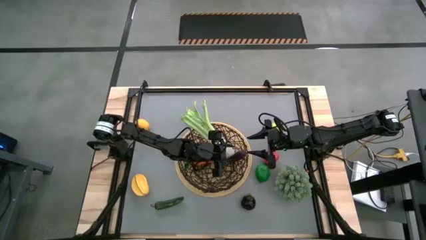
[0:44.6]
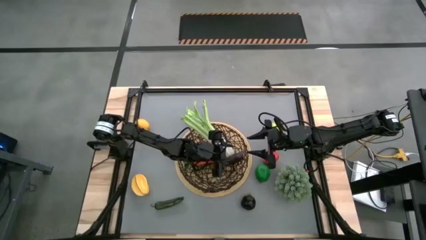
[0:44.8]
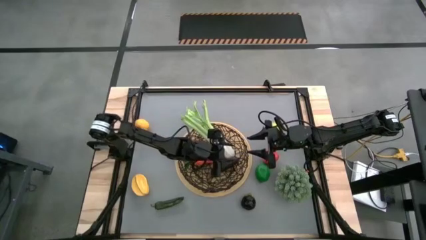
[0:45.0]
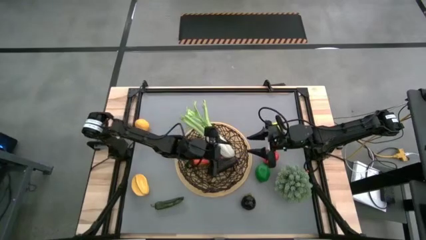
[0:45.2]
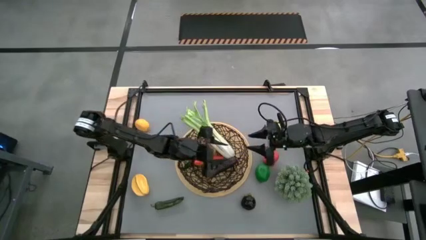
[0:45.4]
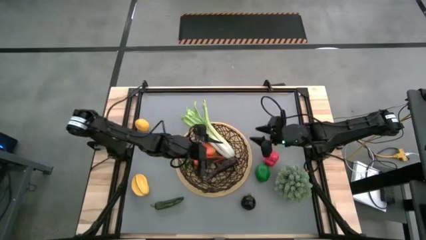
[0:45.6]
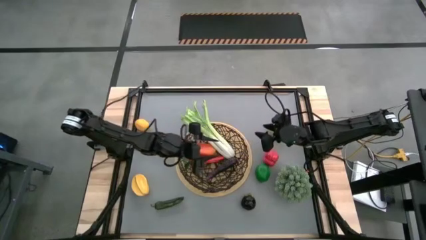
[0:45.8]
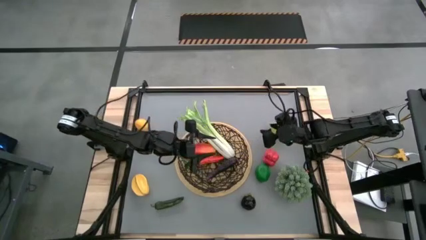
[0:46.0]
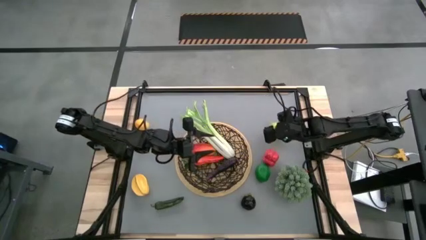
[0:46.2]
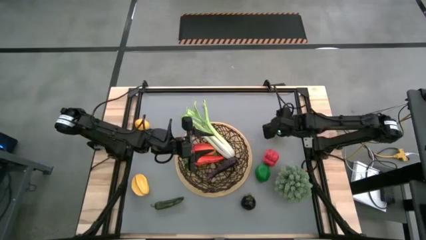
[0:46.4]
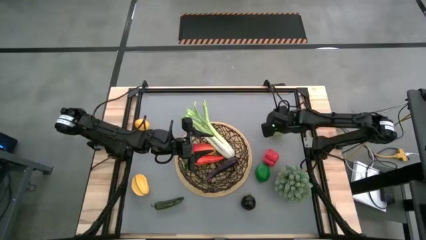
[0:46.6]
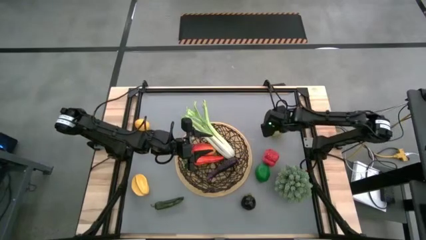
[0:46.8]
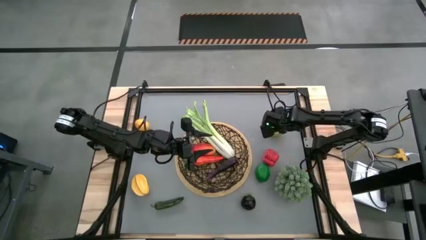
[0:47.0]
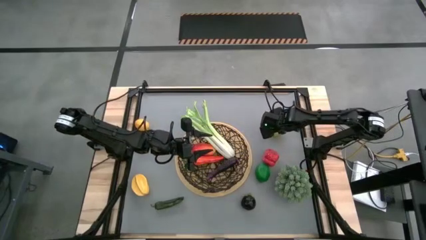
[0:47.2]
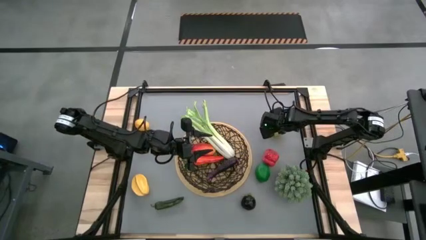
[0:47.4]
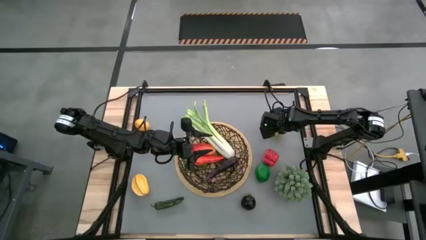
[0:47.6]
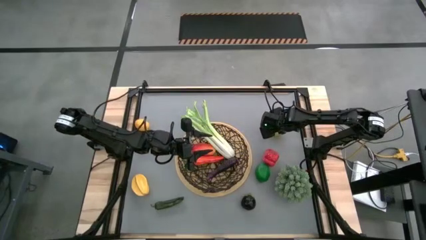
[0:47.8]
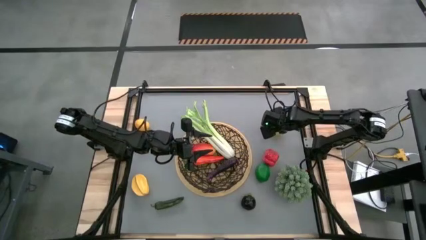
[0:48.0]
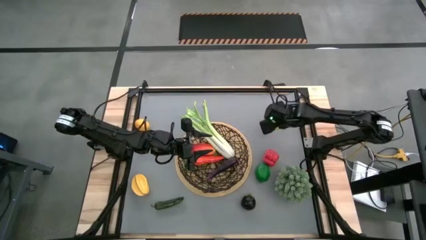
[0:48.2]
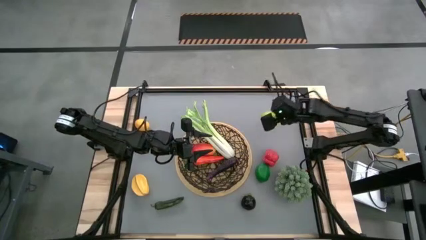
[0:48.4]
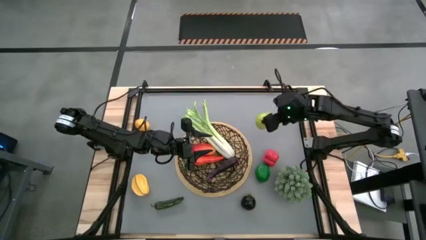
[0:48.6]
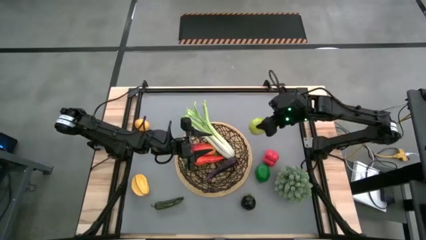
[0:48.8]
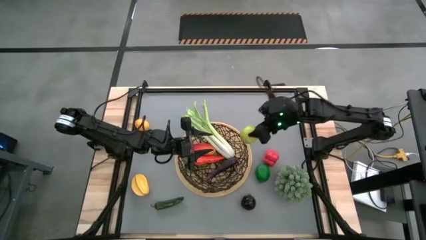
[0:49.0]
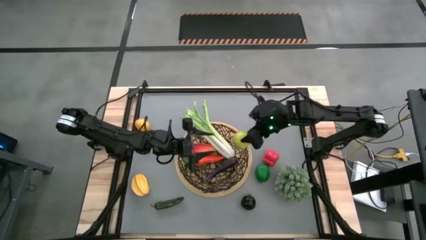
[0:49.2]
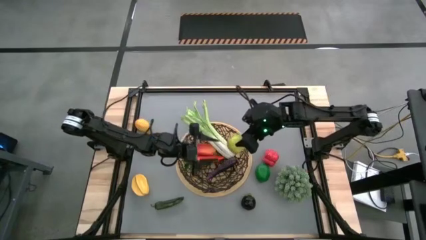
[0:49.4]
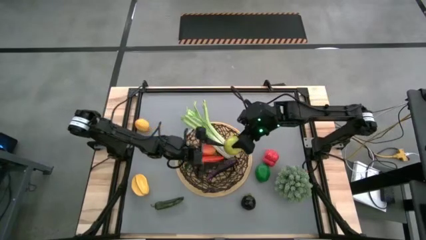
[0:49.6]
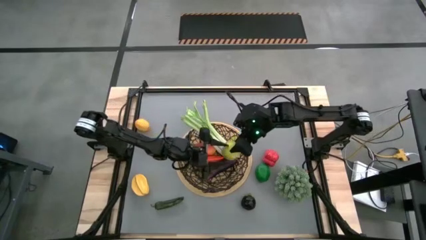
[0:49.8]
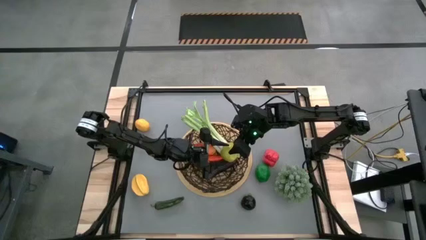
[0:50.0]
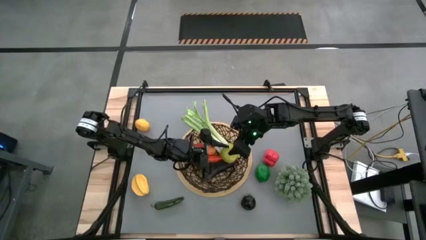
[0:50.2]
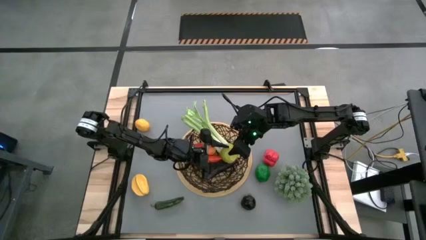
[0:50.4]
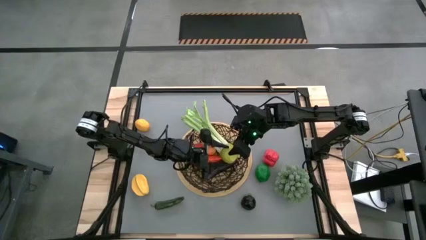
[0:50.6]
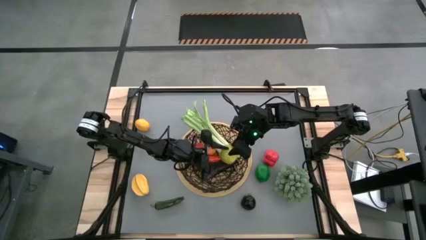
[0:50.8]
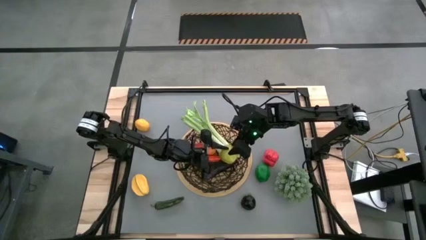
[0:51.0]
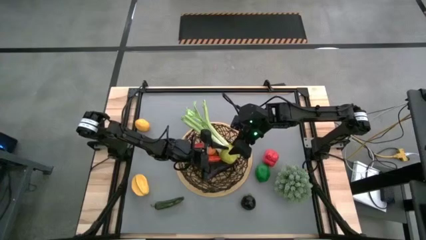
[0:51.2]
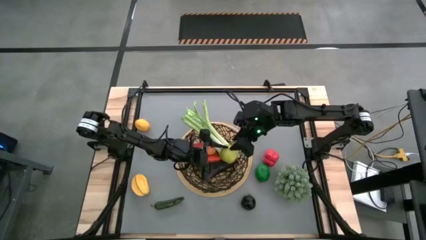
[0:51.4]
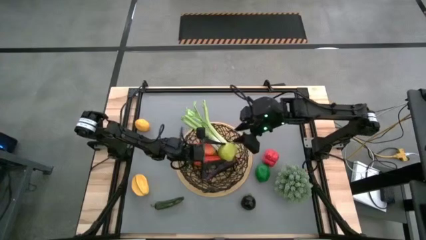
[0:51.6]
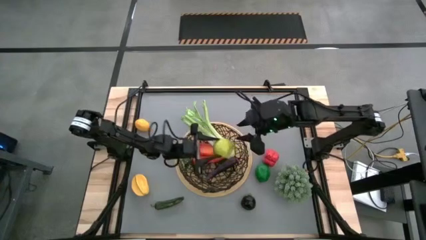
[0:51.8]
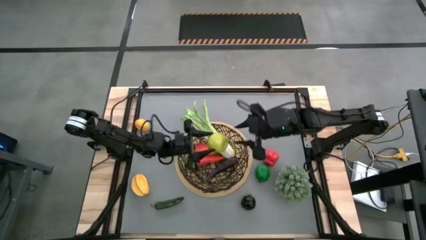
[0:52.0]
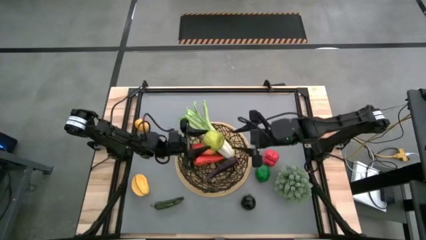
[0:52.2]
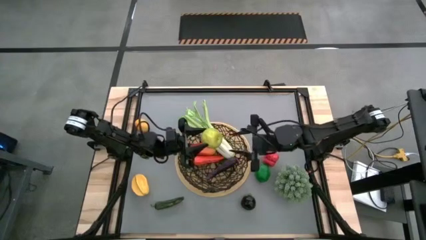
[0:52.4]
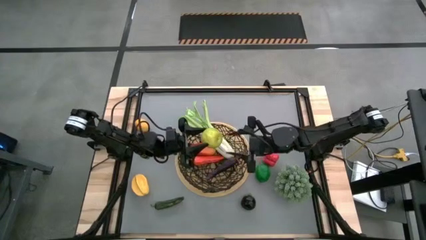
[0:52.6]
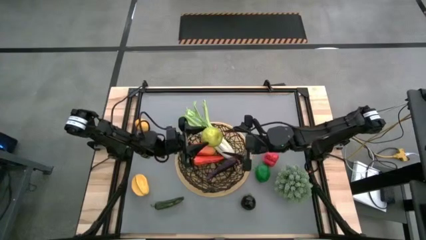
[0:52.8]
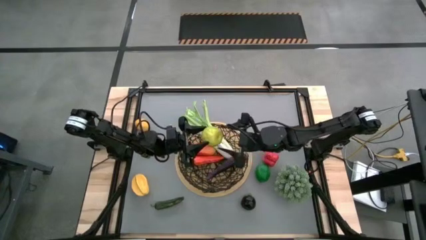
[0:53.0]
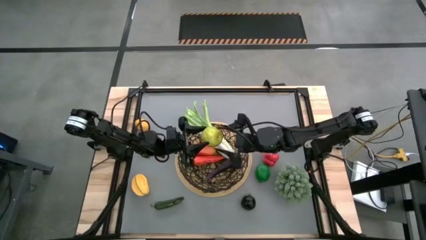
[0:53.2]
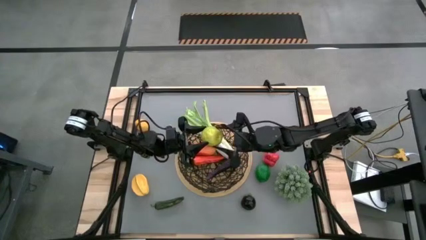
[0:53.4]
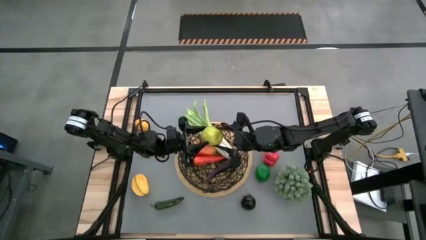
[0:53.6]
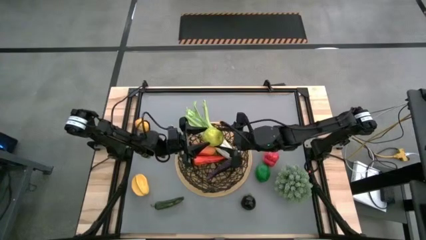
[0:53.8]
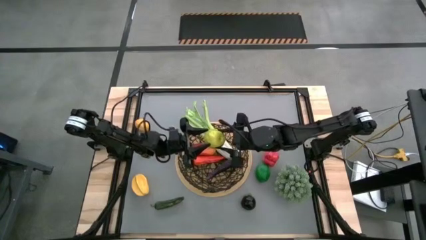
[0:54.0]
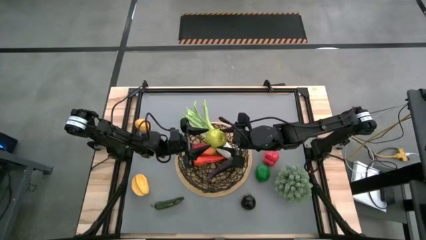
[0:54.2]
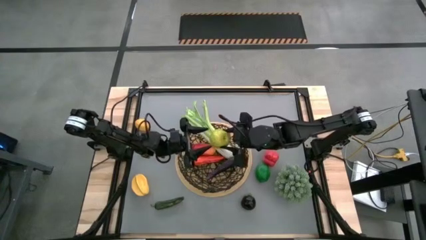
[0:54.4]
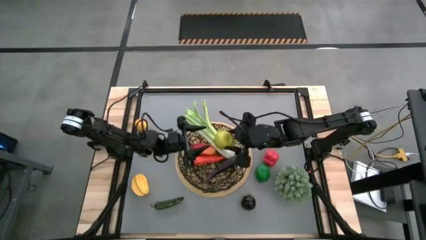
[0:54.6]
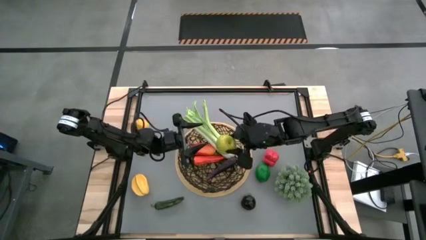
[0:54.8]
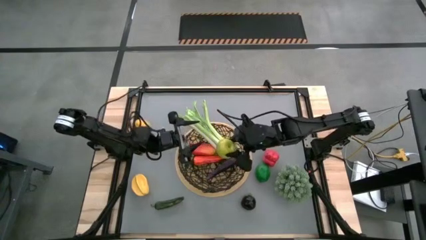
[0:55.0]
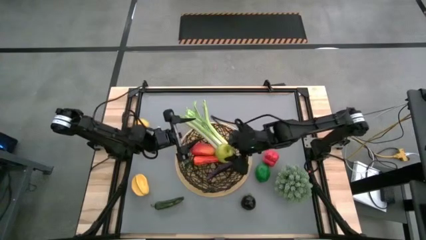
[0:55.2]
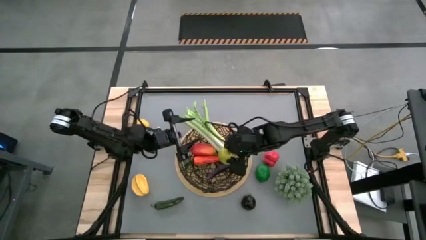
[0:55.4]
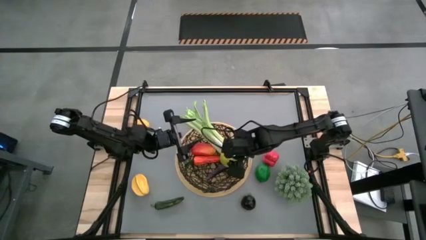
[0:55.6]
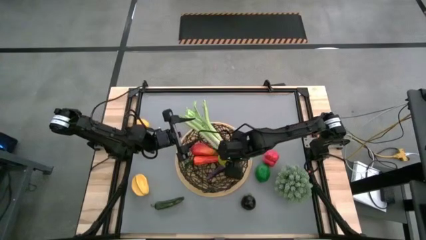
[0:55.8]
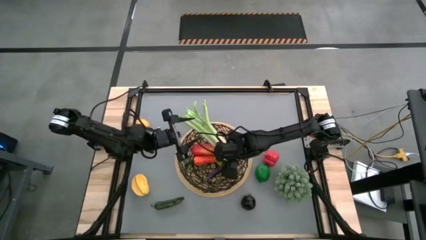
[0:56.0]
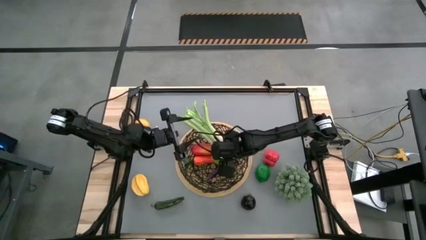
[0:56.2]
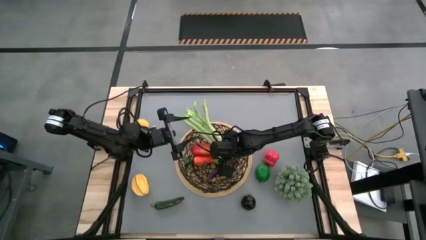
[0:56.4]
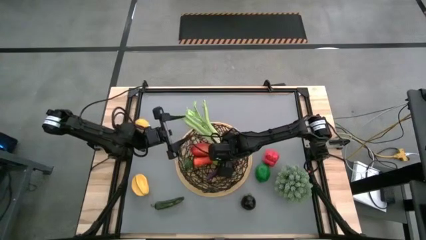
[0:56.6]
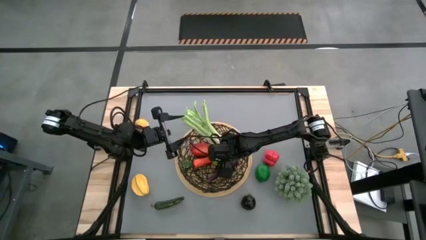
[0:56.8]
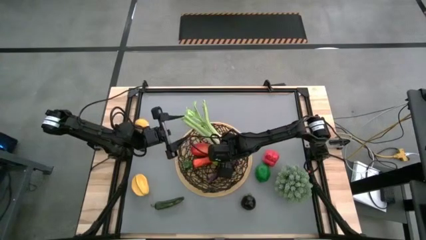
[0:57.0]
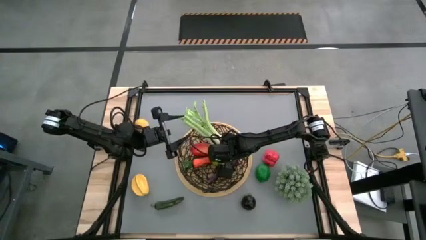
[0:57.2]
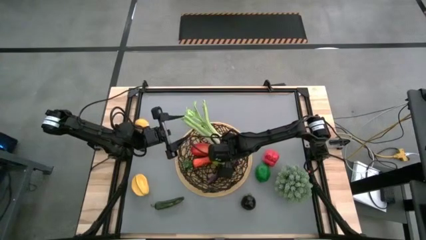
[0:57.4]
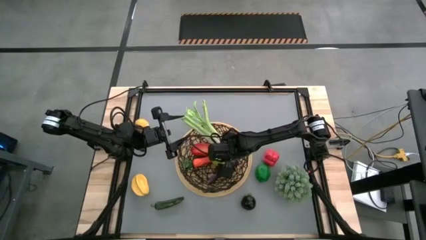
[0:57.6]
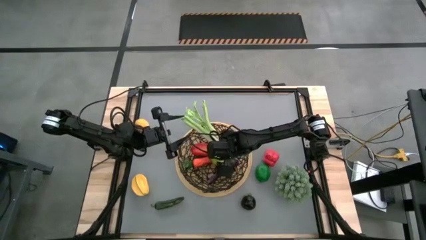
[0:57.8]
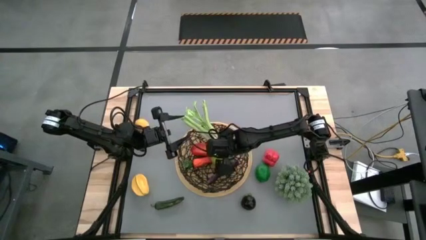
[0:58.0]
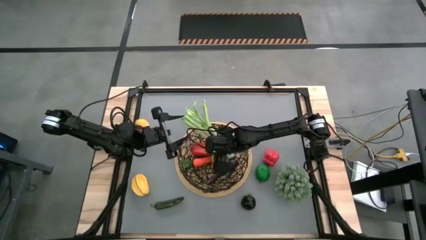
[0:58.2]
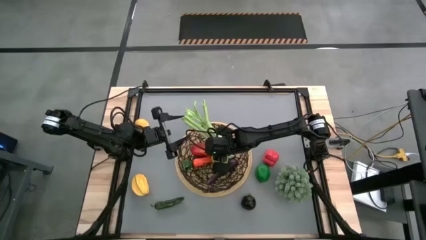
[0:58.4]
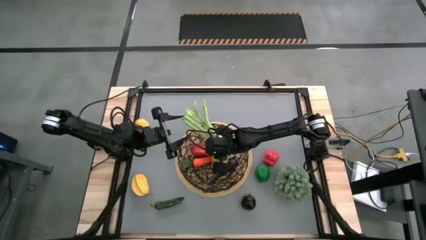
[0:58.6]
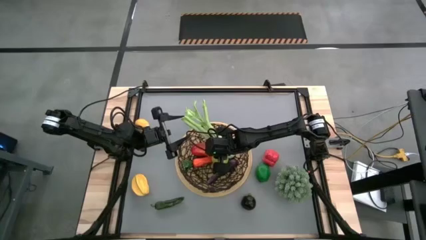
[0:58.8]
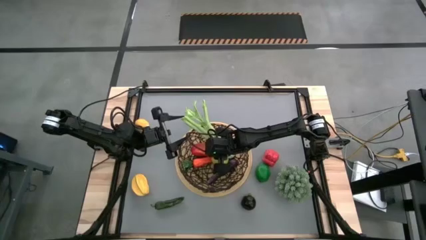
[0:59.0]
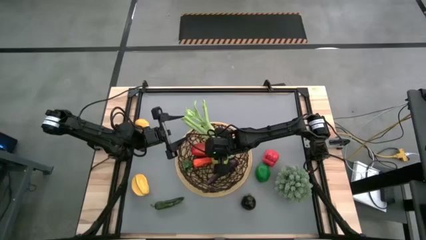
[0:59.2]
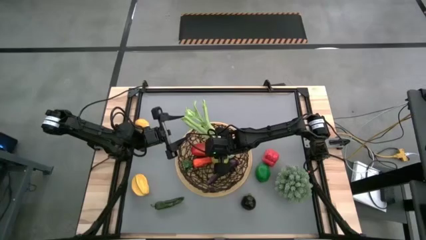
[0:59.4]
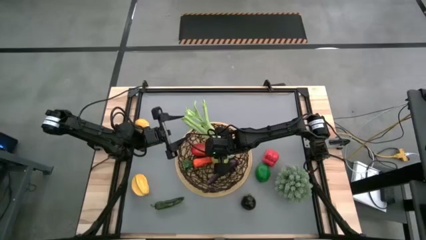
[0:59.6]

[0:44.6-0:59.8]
Task: Build produce basket
Put the green apple into the wire basket

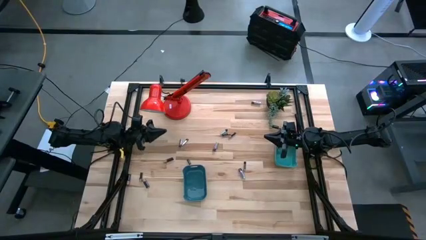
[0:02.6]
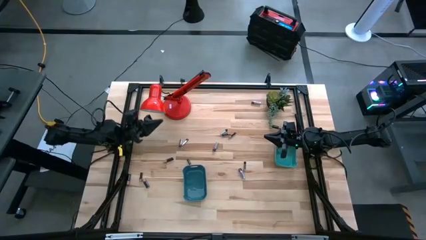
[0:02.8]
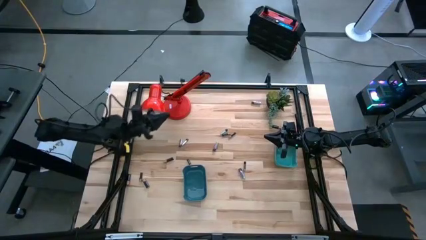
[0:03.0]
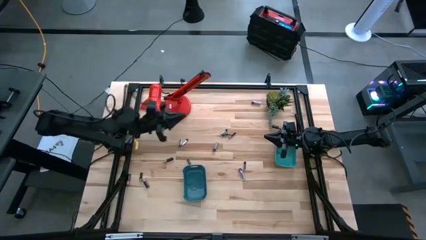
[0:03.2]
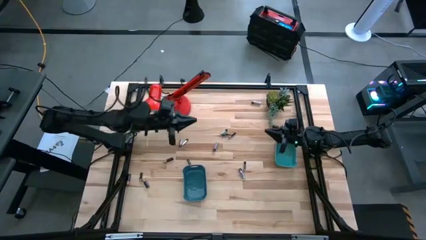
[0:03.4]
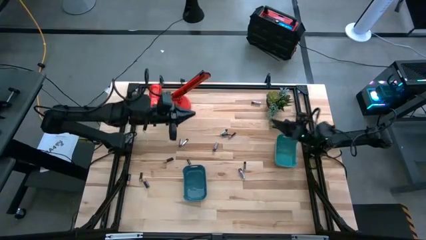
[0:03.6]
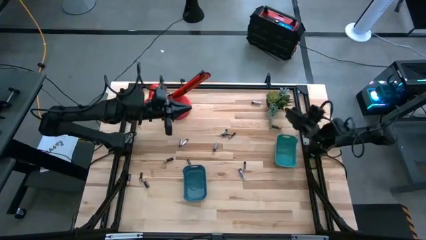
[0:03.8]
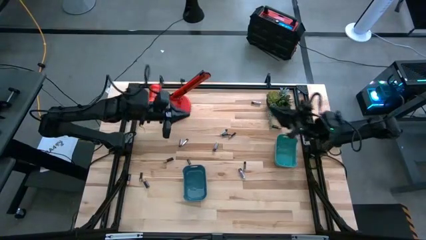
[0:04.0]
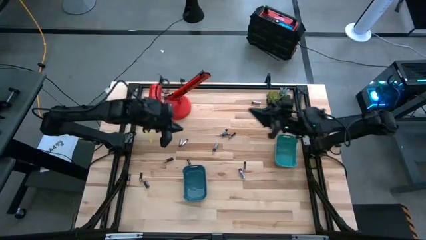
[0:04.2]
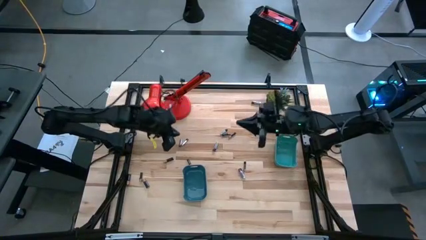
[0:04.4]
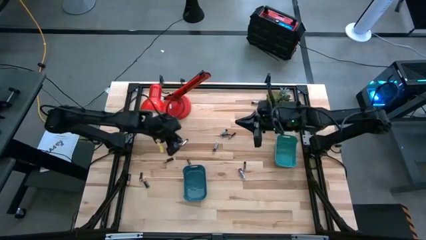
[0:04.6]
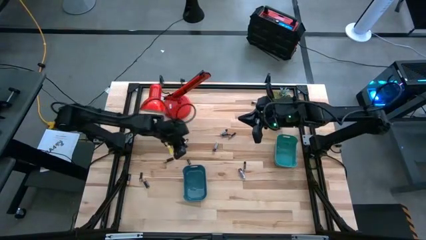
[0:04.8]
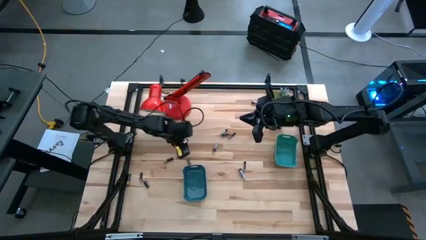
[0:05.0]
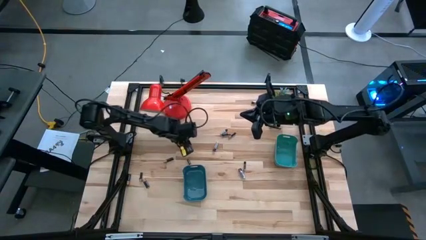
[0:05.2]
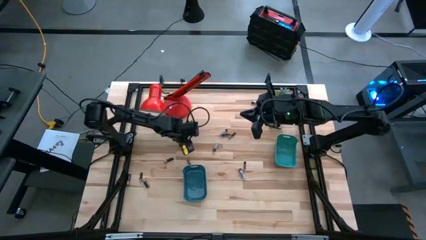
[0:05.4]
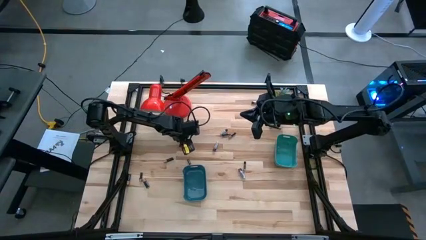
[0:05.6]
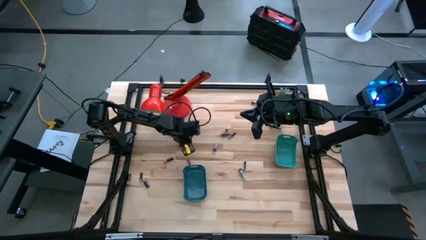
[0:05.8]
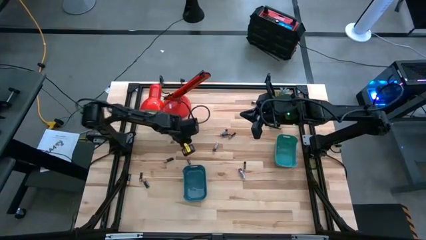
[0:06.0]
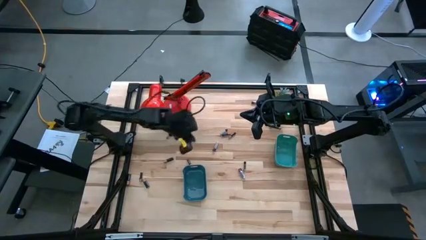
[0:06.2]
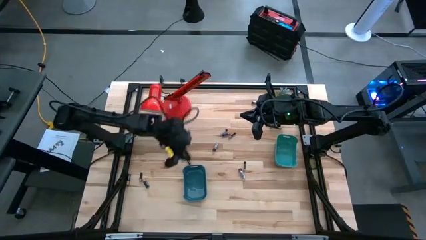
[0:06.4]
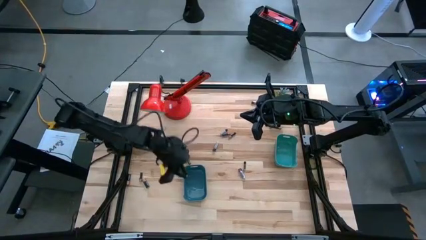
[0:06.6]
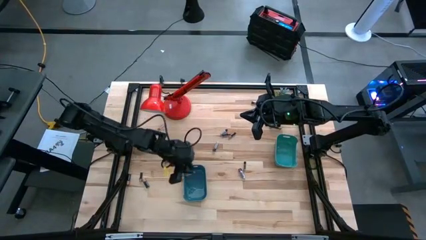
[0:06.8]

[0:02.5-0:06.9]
Task: Sort batteries
Put the silver battery into the blue bin
